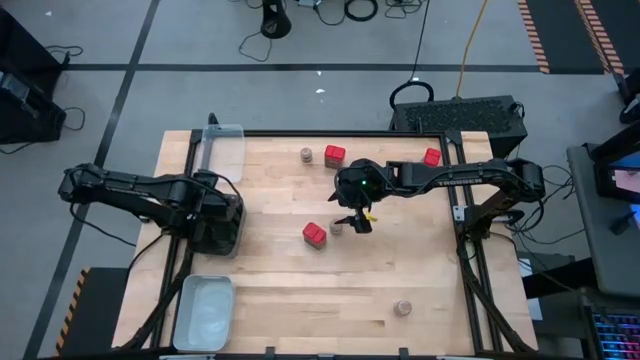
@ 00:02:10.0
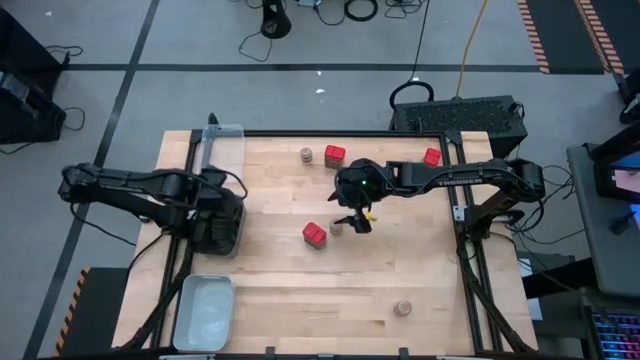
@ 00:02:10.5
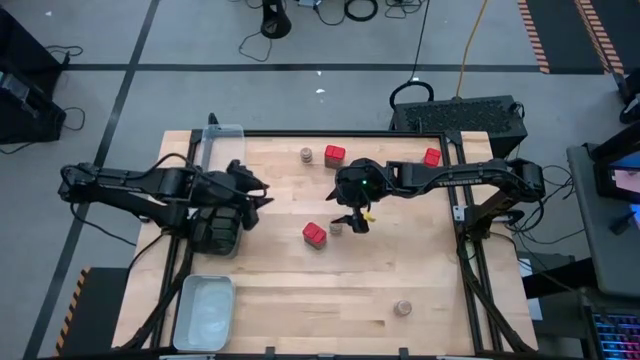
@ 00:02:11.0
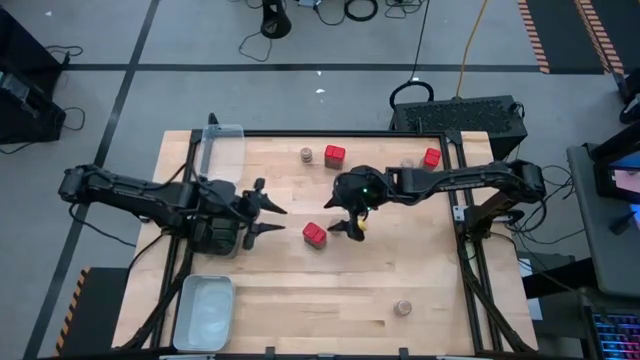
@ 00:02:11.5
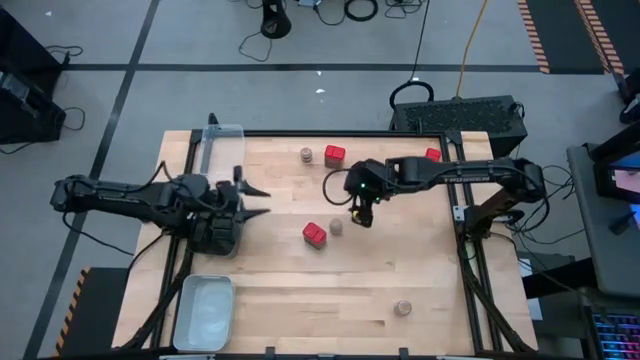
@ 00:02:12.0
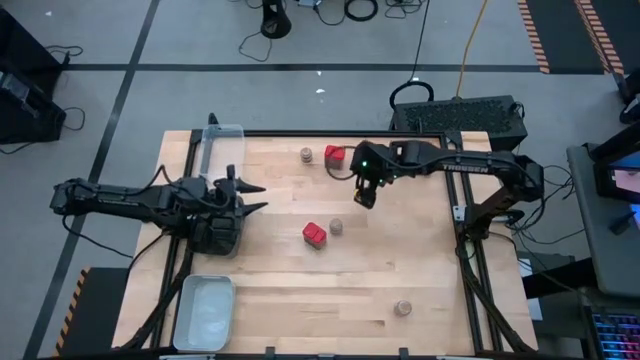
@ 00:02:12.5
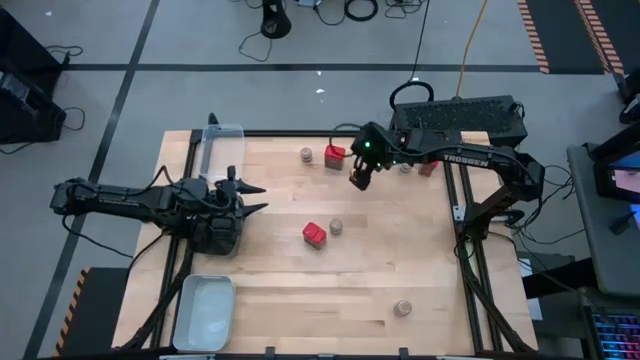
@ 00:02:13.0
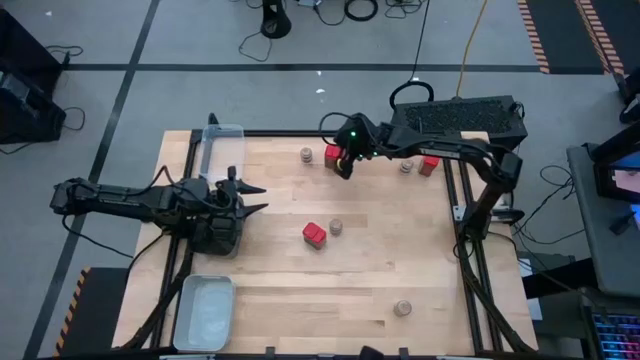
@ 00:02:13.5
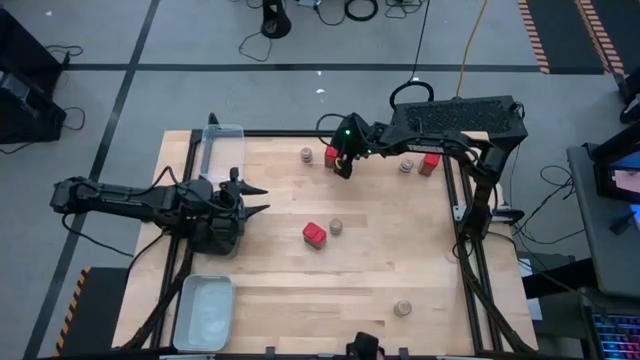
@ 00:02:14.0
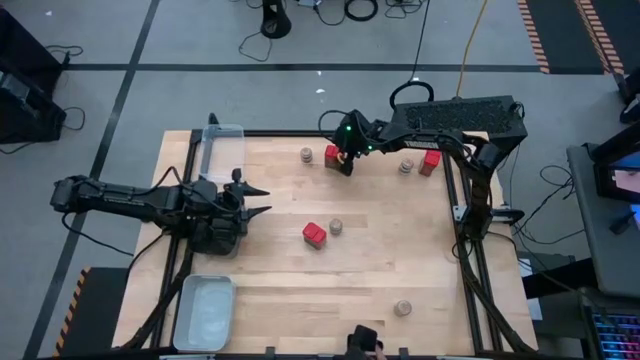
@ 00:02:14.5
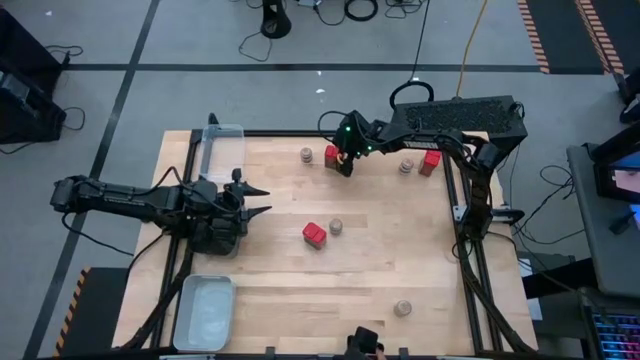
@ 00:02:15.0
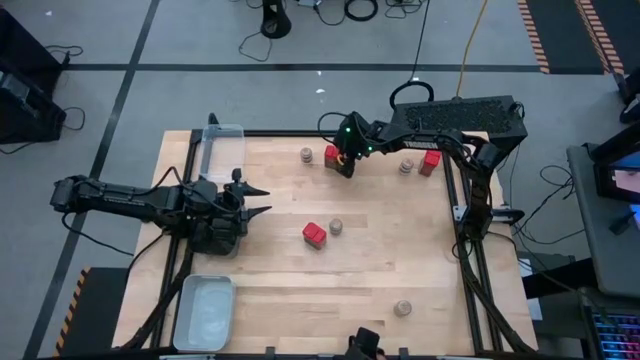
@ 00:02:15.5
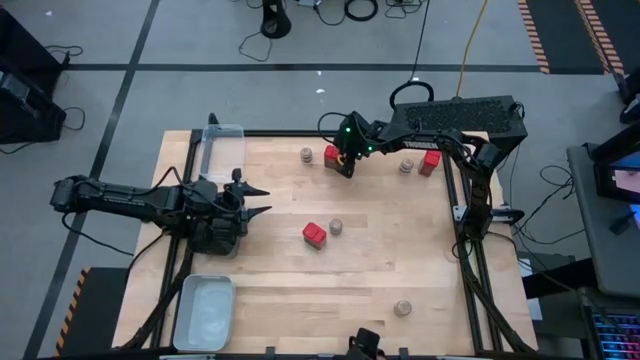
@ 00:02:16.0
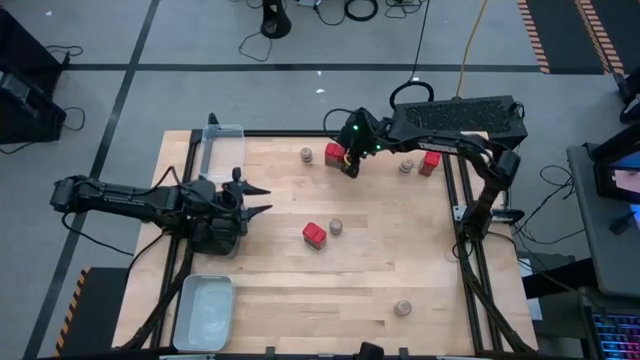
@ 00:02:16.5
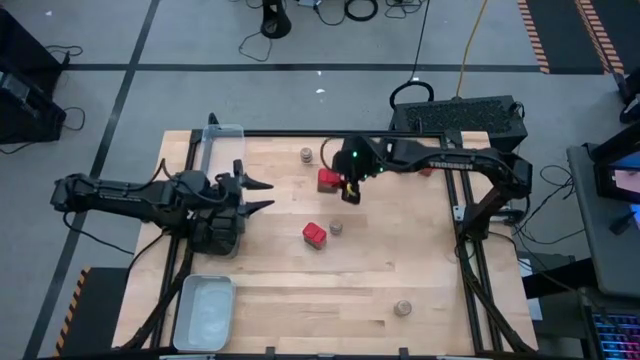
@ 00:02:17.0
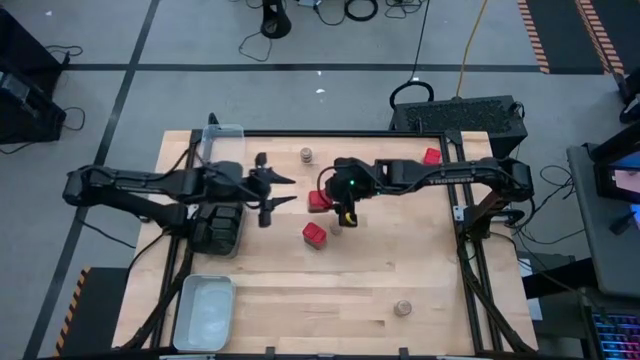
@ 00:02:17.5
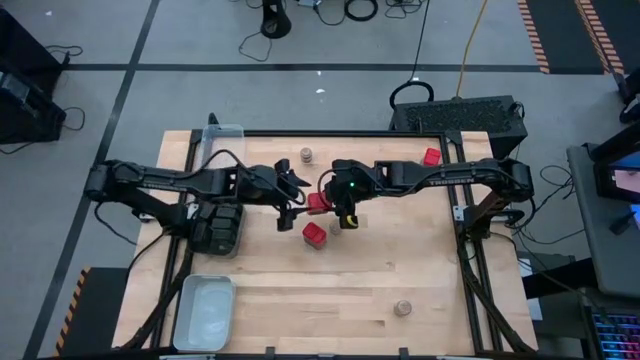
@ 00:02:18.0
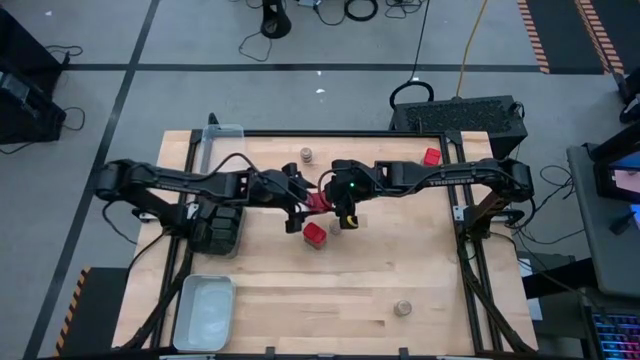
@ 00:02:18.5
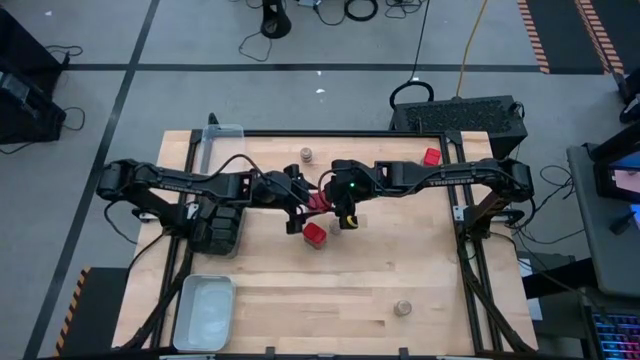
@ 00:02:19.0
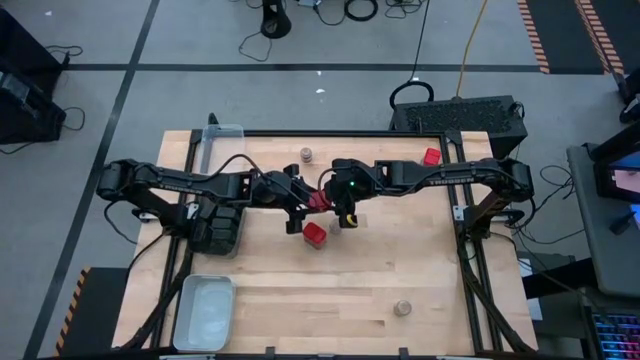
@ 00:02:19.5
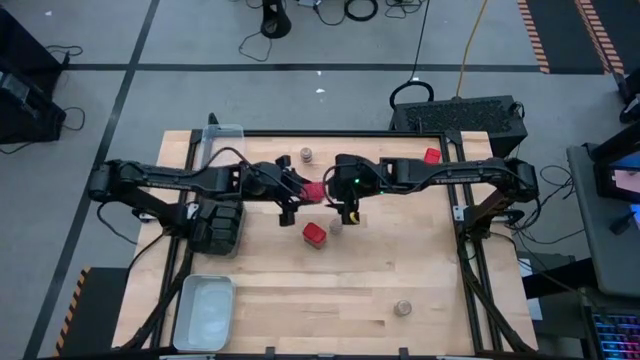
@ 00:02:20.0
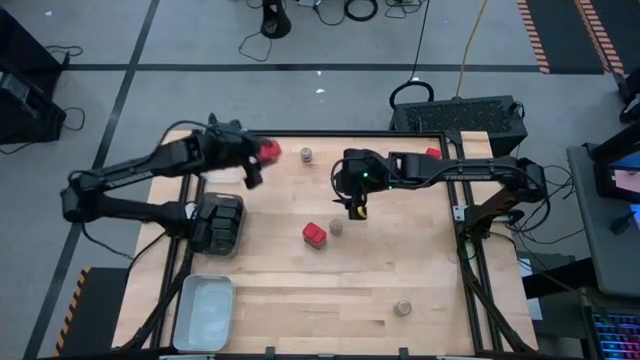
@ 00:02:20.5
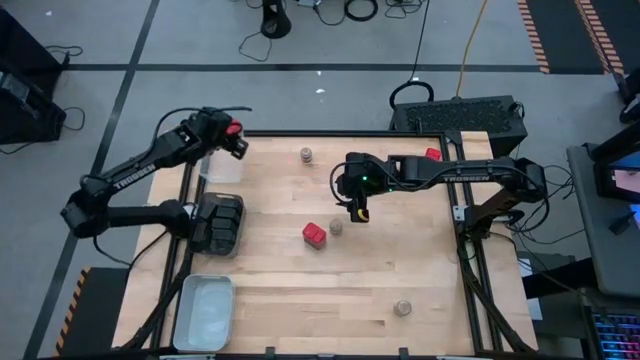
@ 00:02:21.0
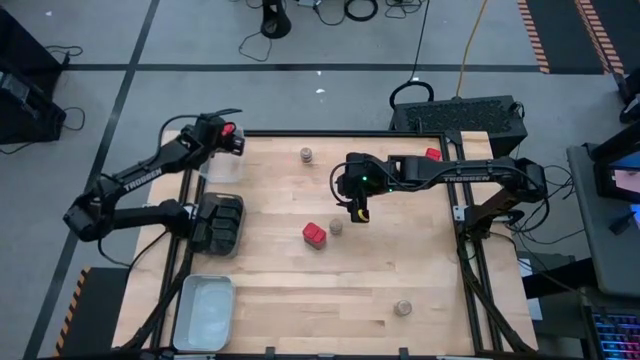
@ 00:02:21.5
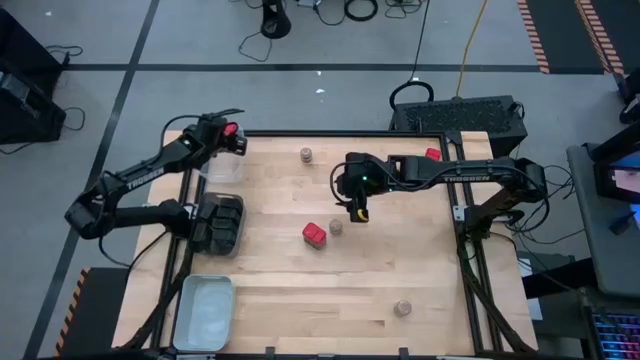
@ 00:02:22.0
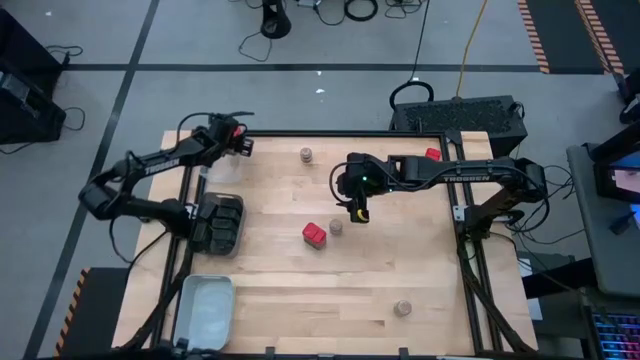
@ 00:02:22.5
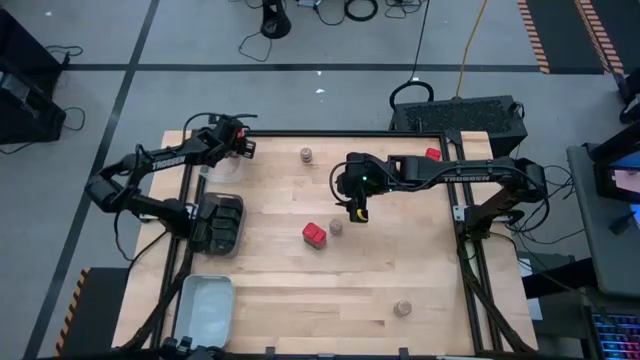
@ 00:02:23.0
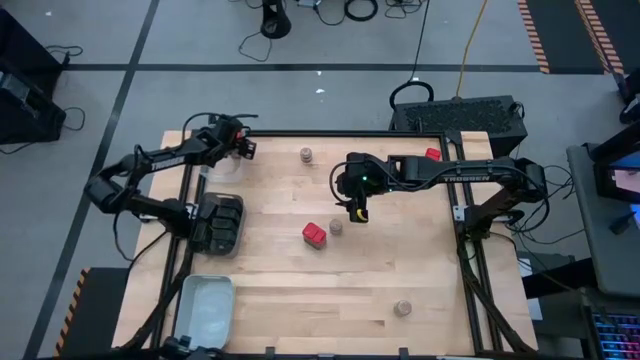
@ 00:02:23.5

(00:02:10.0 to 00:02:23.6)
Task: Sort spices by type
Put the red seasoning can into the transparent bin

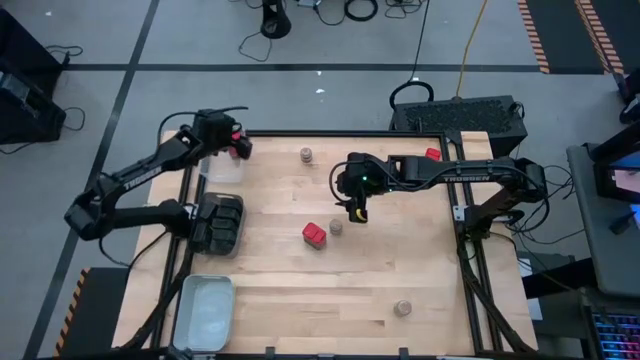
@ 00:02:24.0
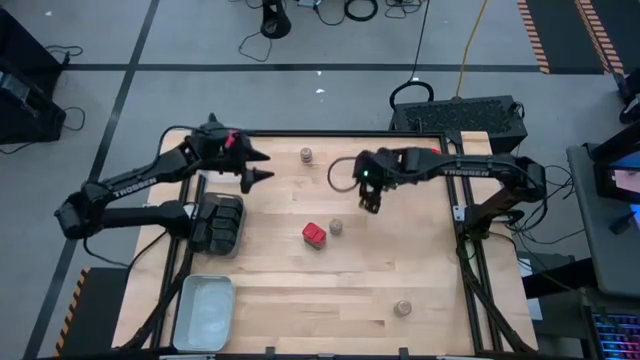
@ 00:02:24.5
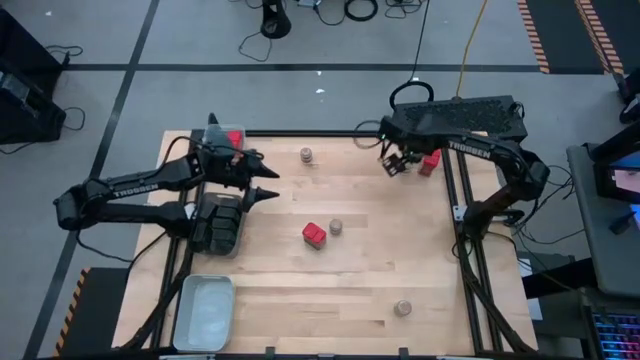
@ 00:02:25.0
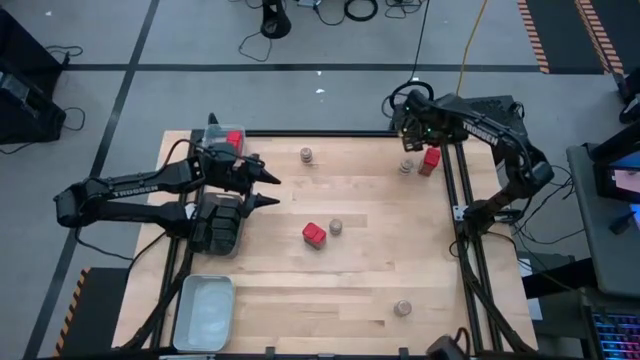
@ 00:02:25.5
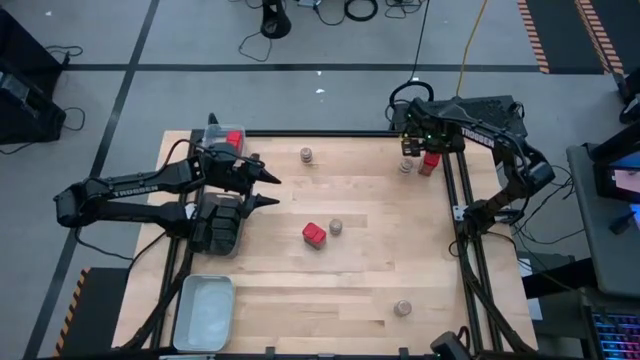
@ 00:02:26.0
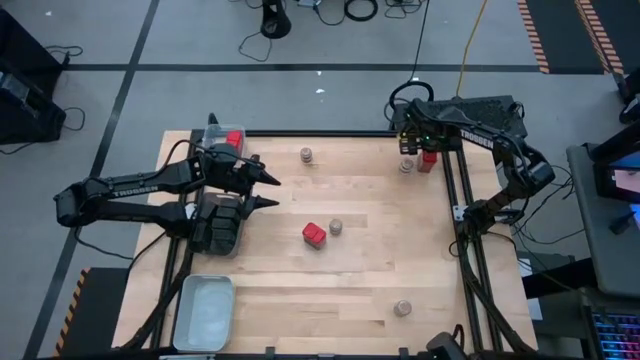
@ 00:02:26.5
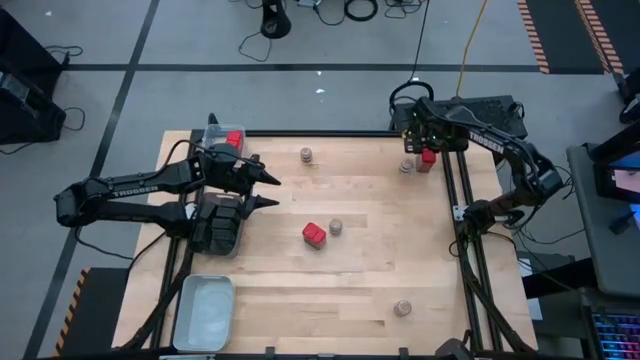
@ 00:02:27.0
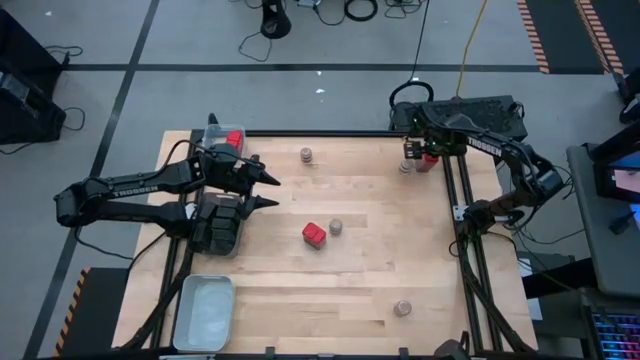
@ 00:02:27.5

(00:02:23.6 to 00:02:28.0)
Put the red seasoning can into the transparent bin

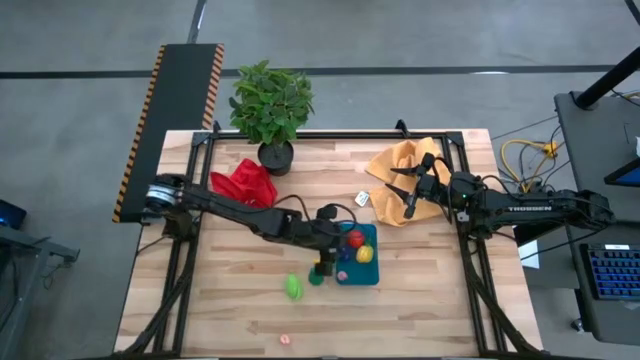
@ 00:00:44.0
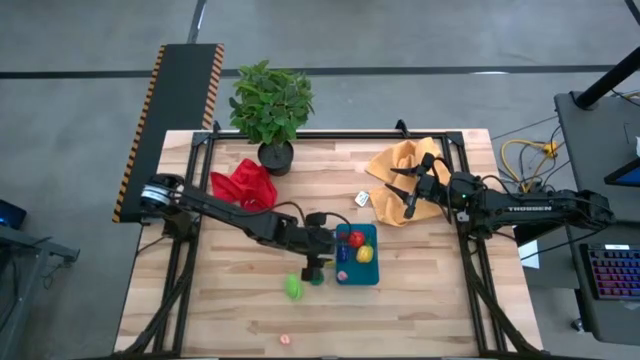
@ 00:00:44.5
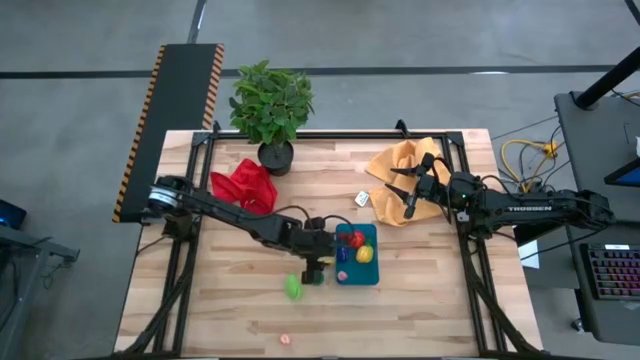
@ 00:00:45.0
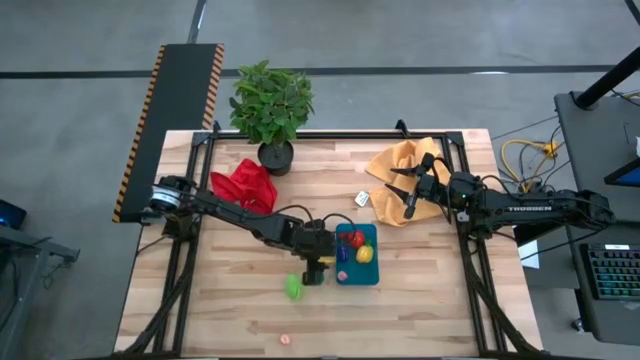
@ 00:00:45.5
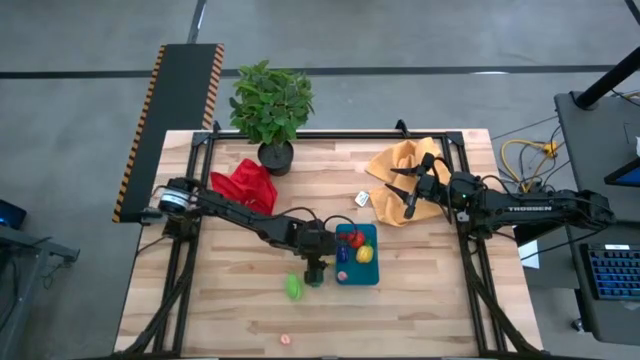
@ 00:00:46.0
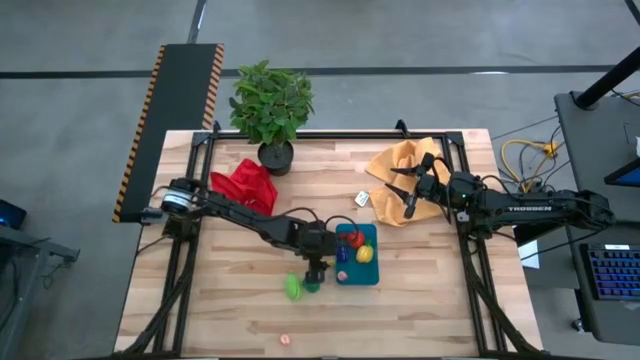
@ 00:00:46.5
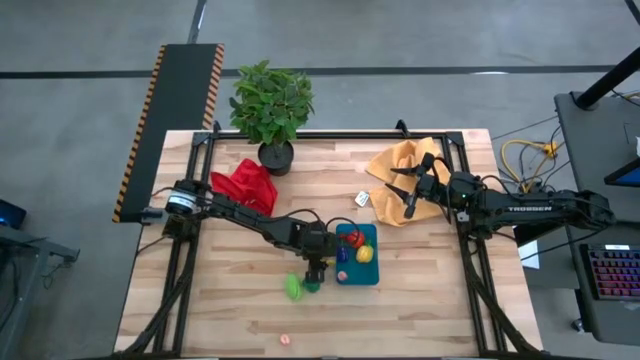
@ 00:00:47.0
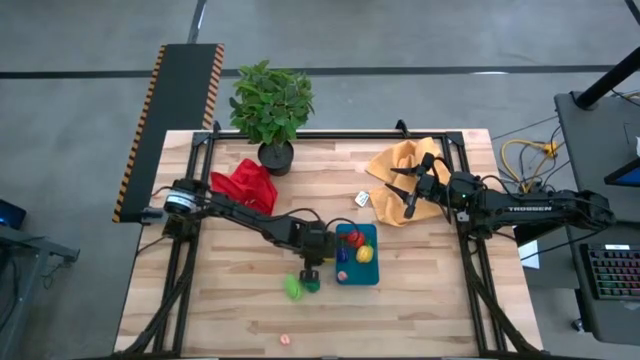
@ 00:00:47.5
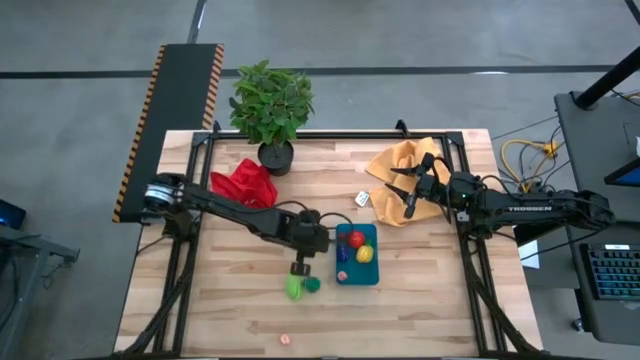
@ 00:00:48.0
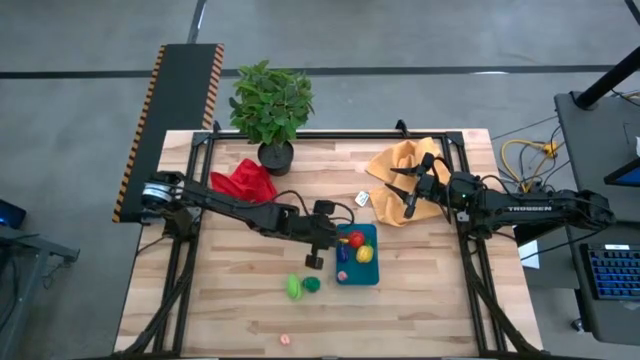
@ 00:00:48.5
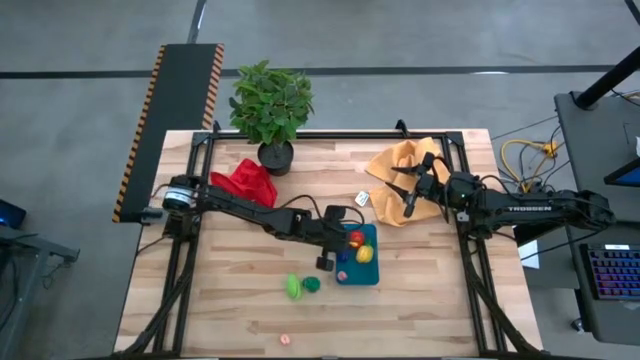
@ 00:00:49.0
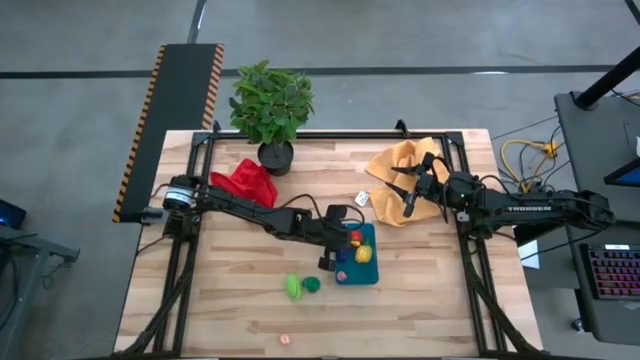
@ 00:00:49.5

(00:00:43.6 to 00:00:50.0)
Task: Pick and placing Produce into tupperware
Put the yellow corn into the blue bin
